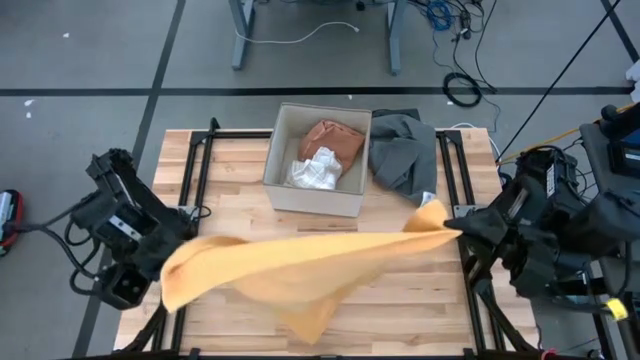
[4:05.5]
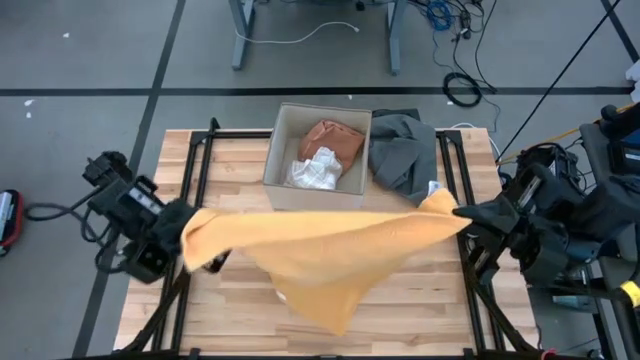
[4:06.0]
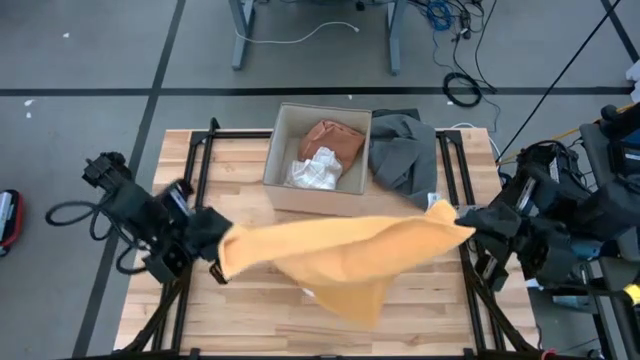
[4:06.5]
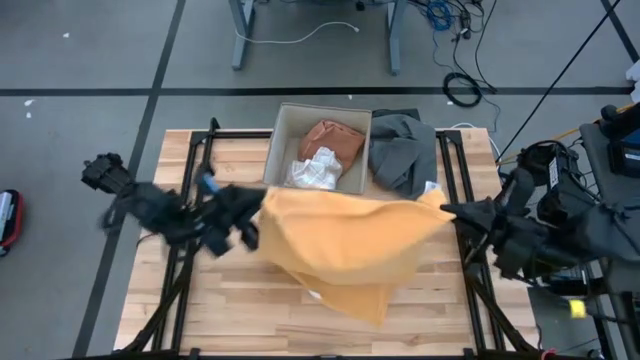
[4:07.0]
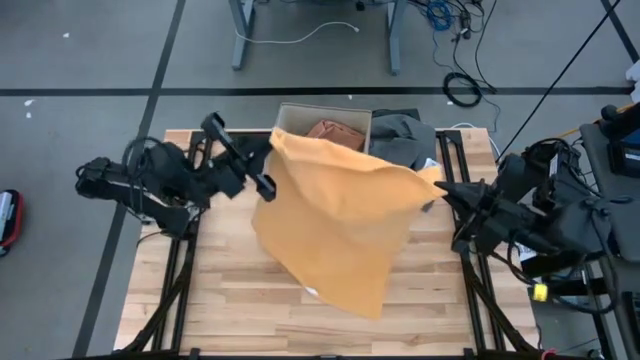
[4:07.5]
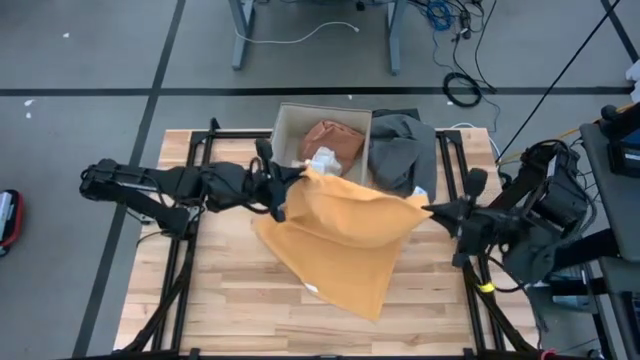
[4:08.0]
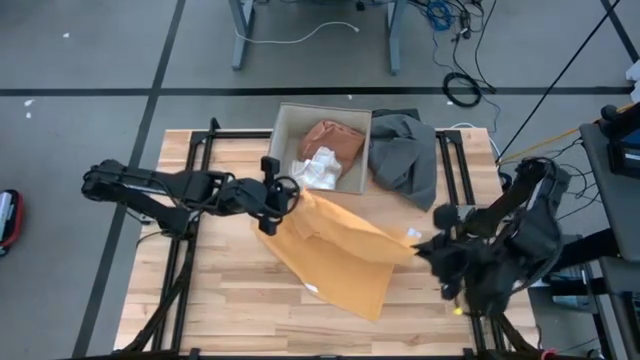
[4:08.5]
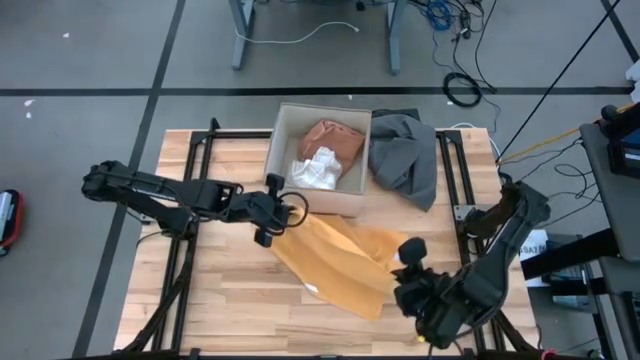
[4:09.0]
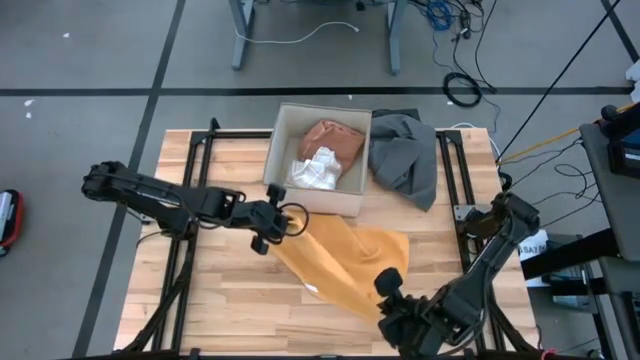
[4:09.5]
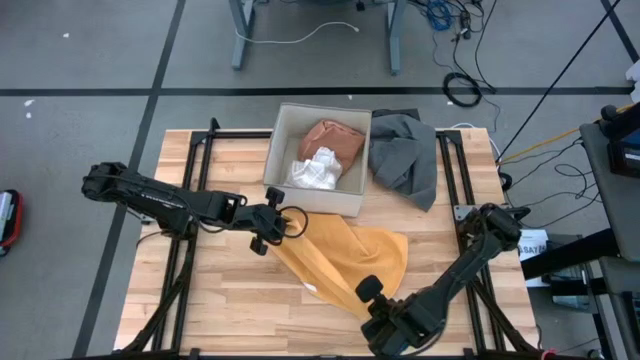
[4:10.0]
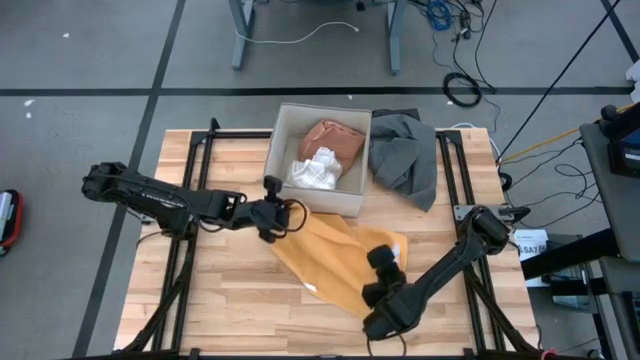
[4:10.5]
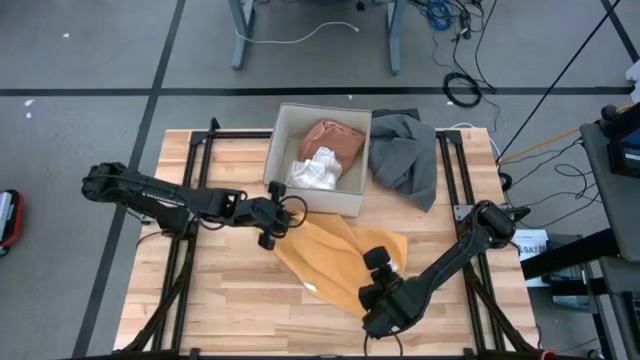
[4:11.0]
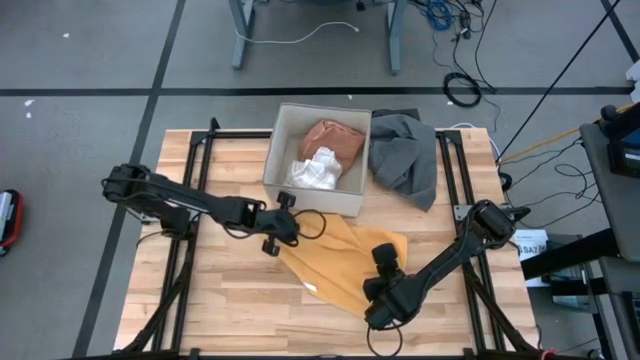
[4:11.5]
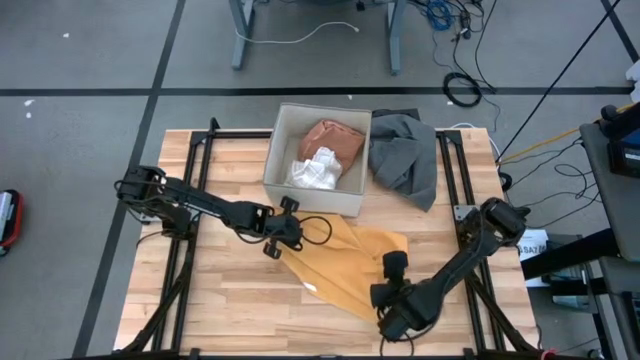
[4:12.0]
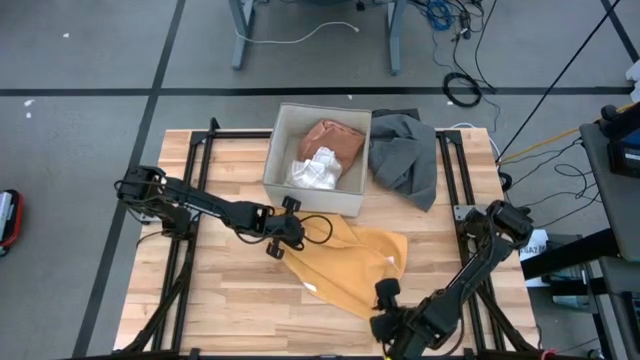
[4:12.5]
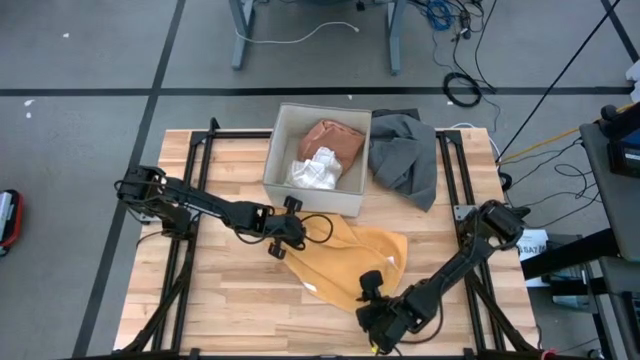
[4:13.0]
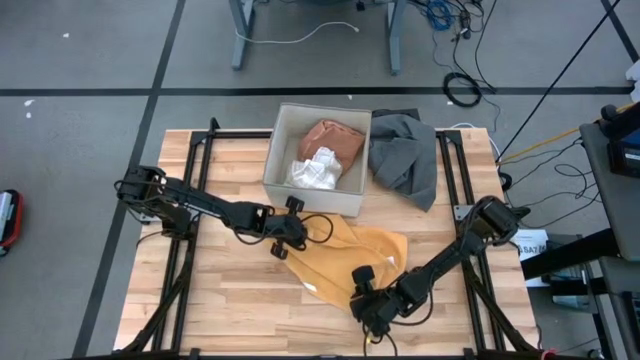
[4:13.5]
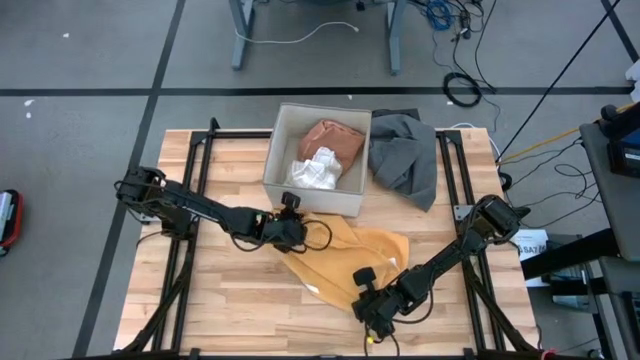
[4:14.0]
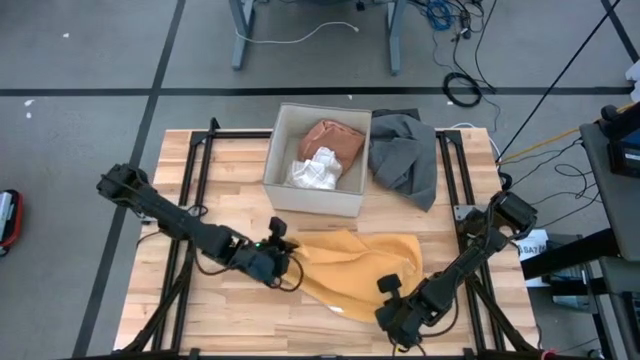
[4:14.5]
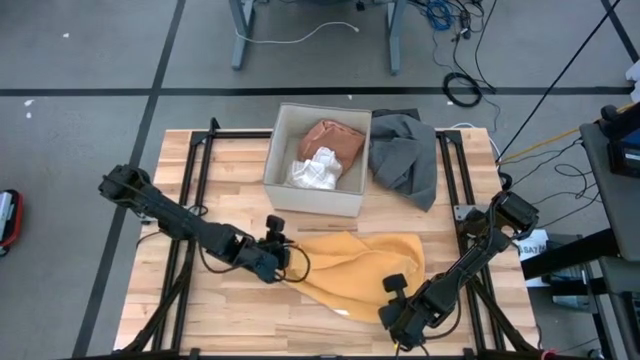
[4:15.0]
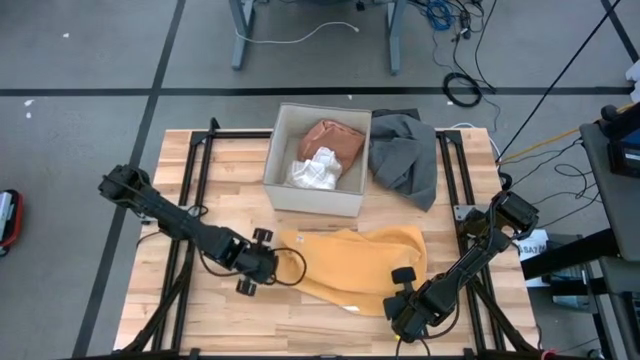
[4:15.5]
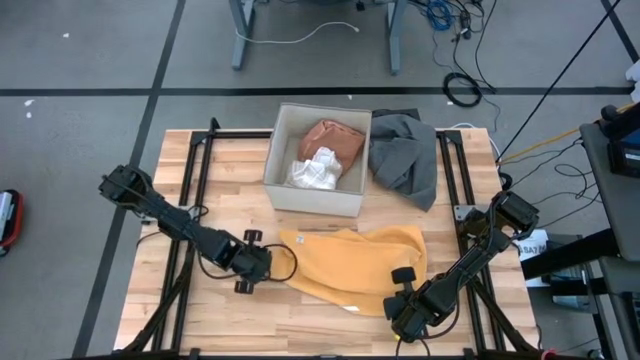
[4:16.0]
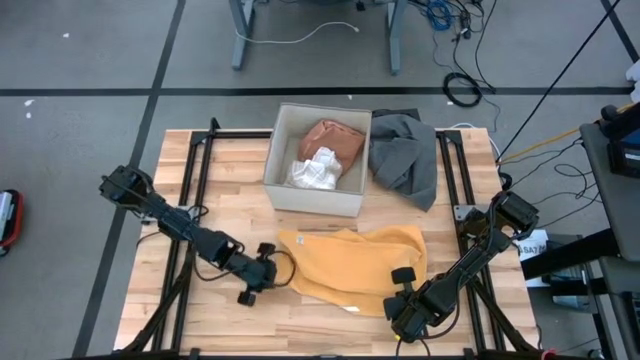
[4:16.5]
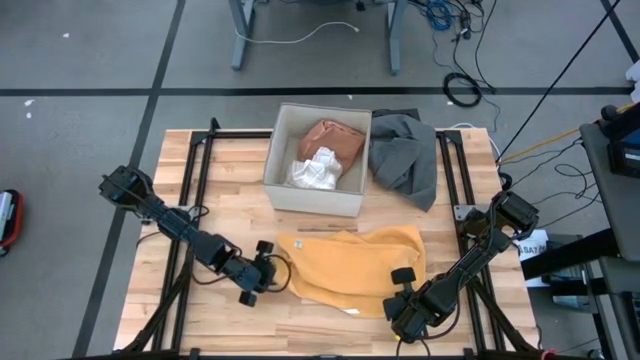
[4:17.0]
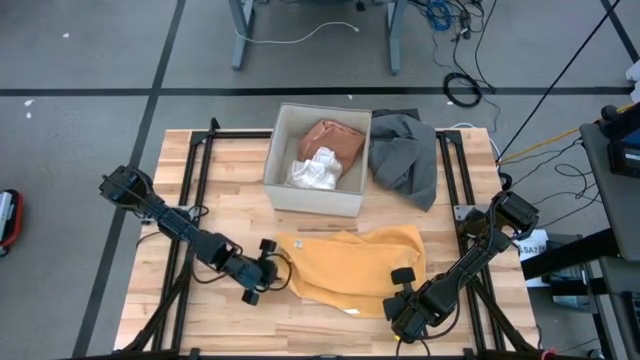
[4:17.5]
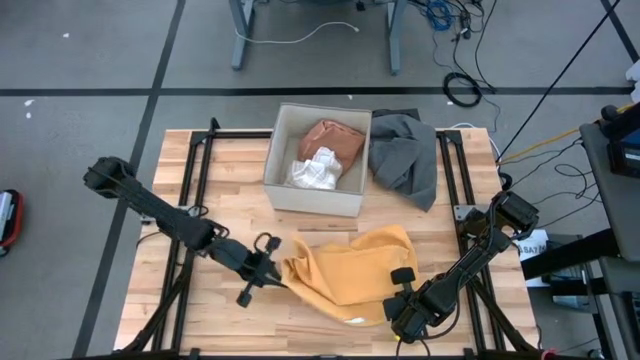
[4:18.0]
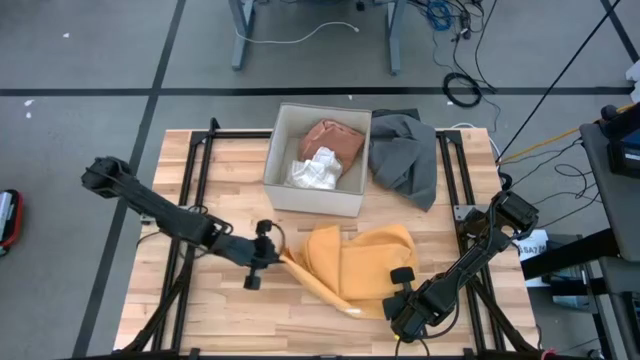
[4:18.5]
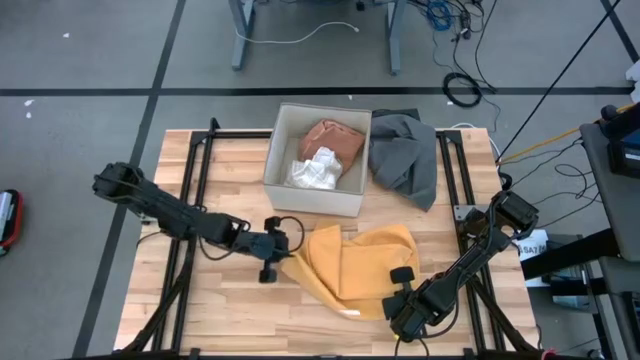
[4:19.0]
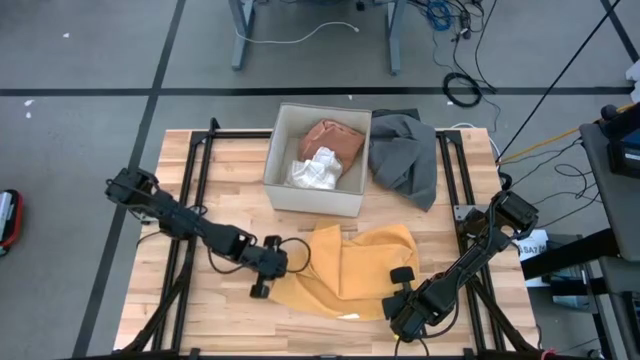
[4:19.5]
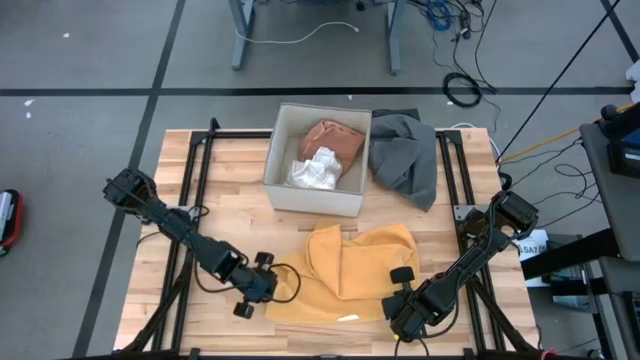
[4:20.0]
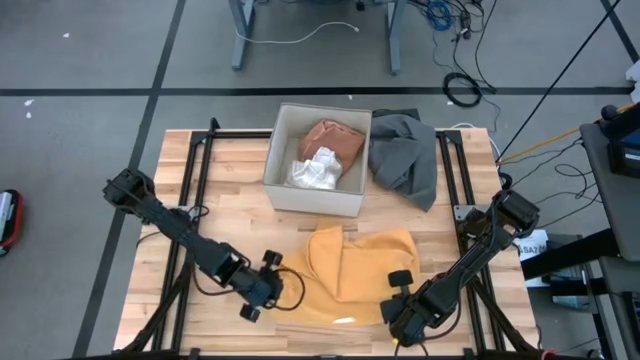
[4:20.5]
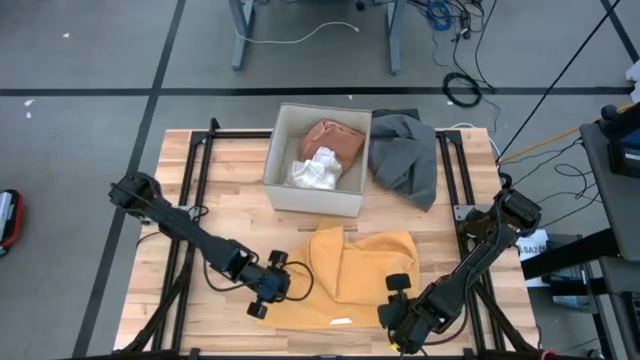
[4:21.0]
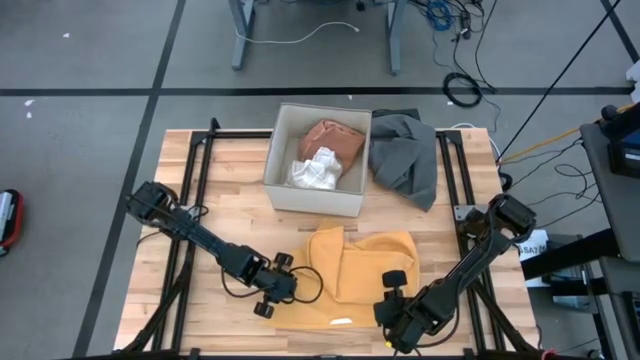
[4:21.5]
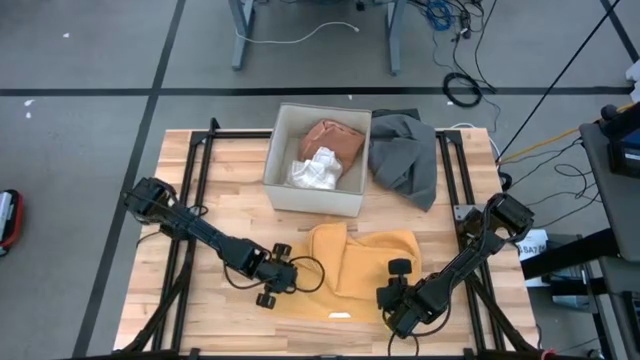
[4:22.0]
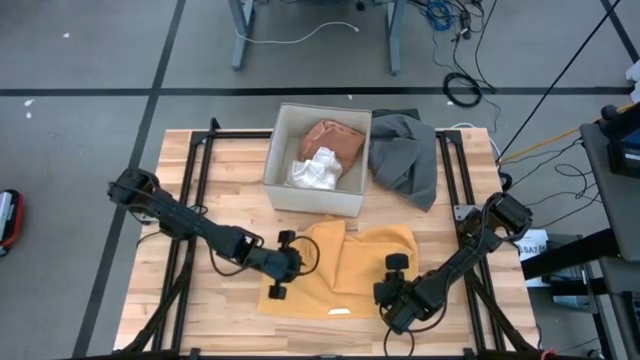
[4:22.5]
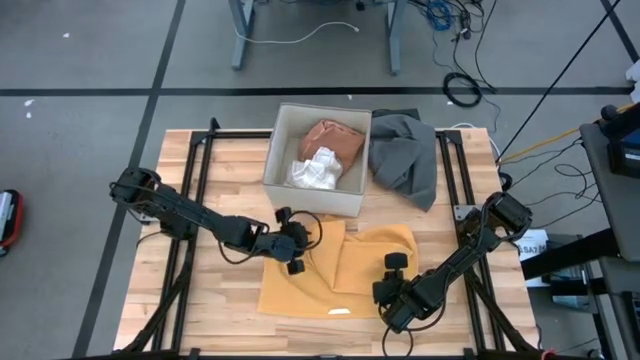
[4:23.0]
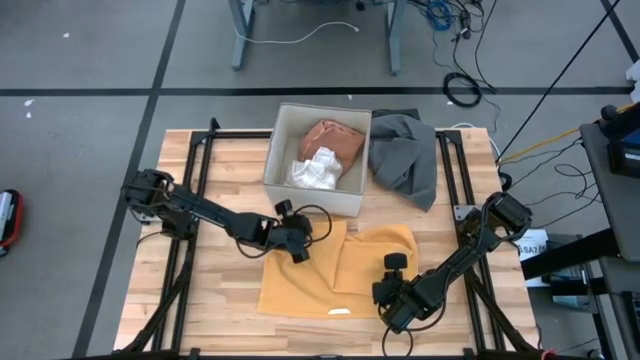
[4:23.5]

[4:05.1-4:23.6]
Task: Fold towel
Fold the orange towel

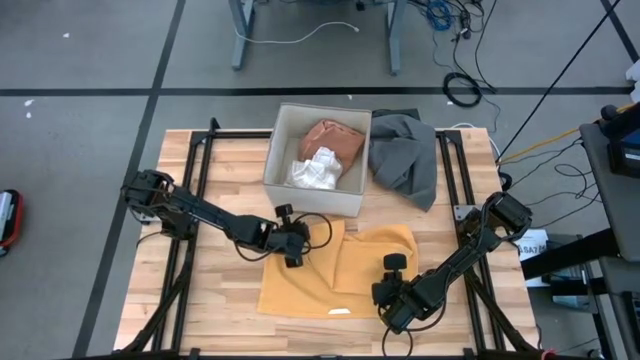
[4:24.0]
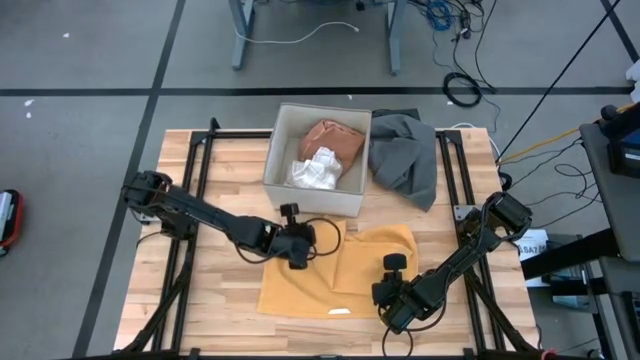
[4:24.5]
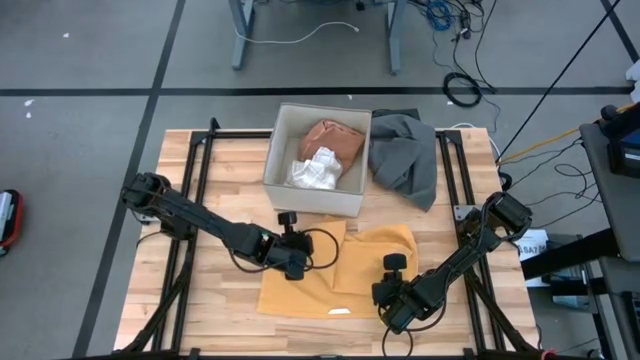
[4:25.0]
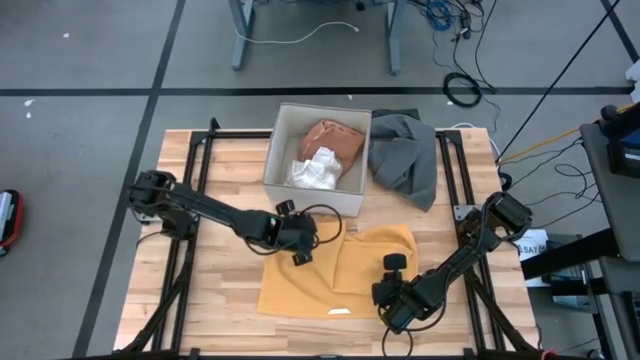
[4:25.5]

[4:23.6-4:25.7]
Fold the orange towel
